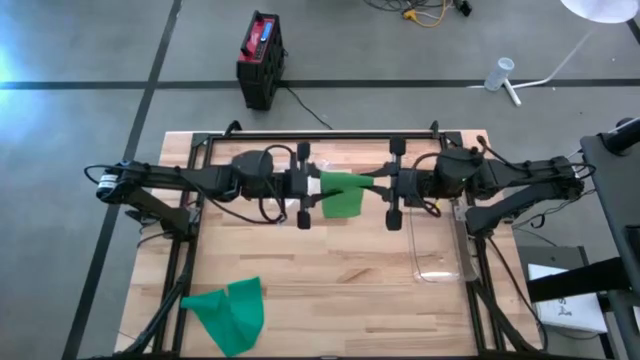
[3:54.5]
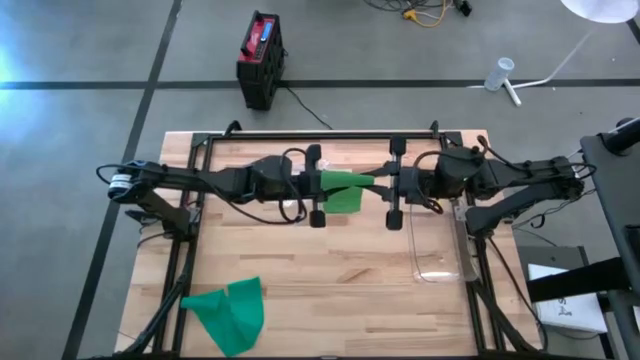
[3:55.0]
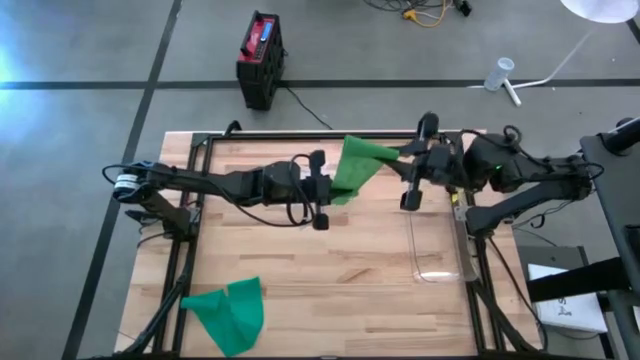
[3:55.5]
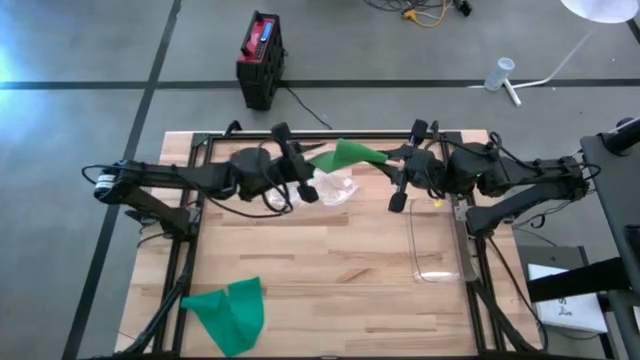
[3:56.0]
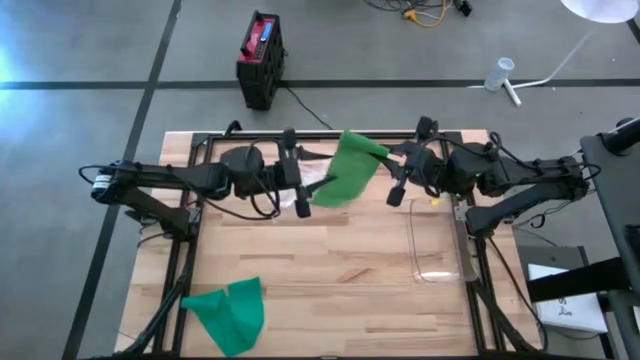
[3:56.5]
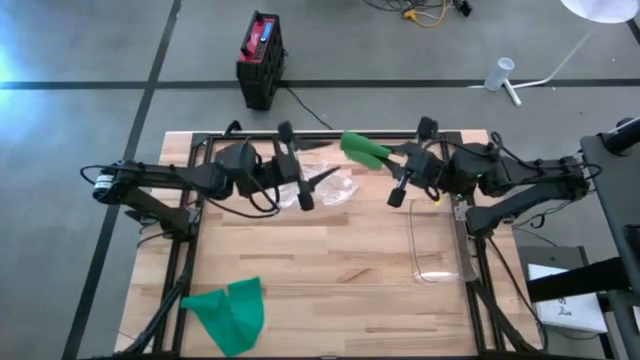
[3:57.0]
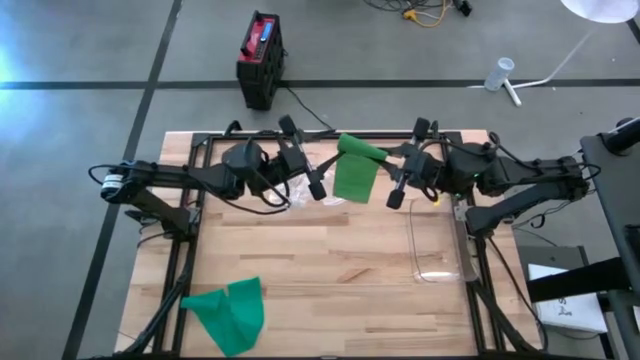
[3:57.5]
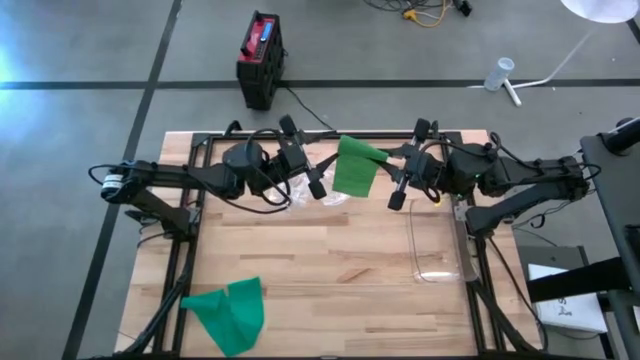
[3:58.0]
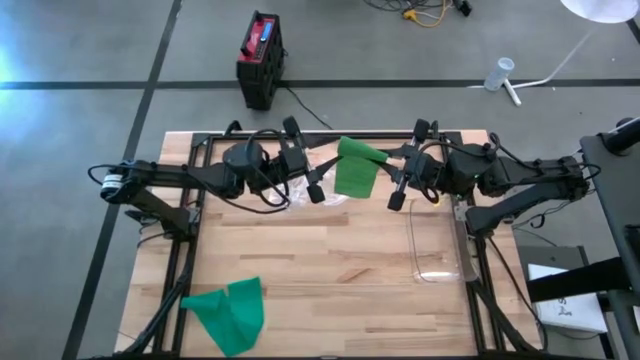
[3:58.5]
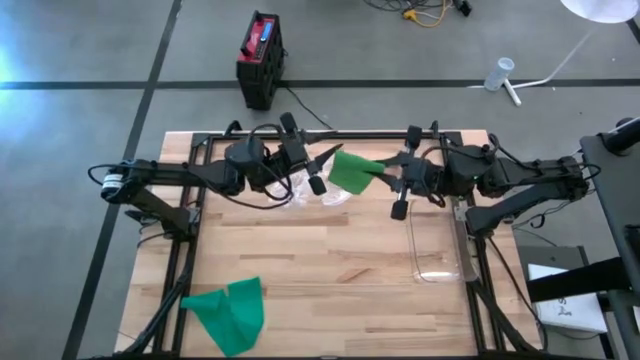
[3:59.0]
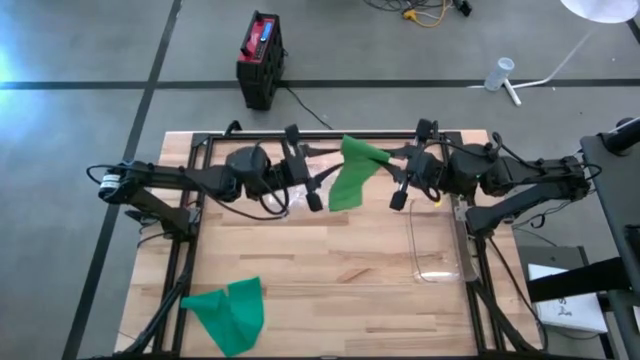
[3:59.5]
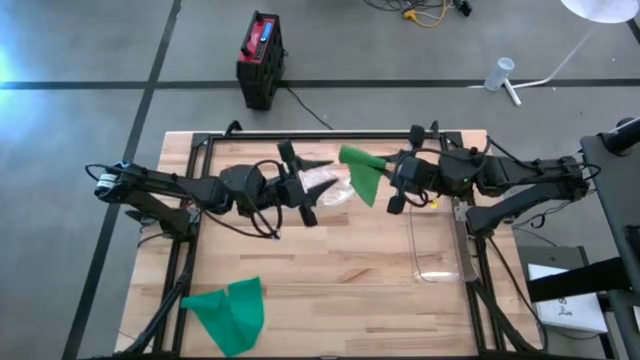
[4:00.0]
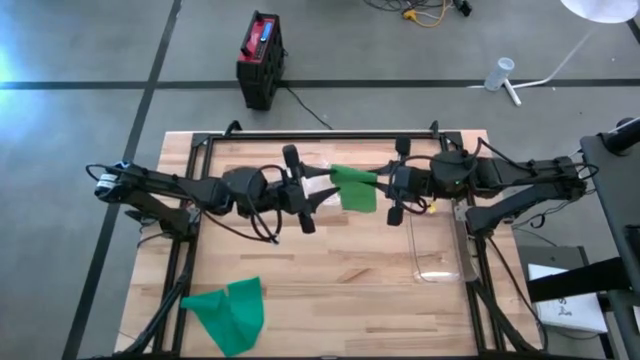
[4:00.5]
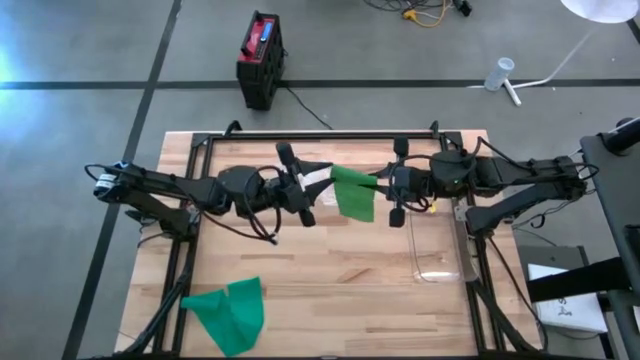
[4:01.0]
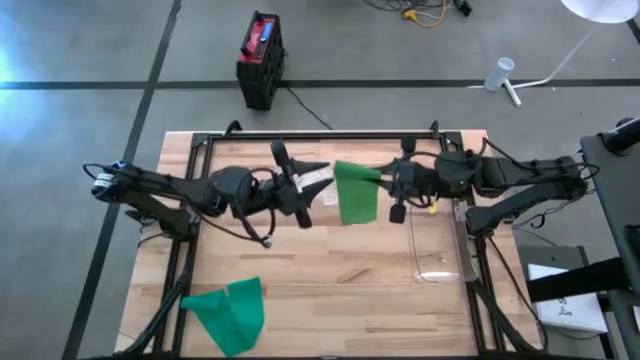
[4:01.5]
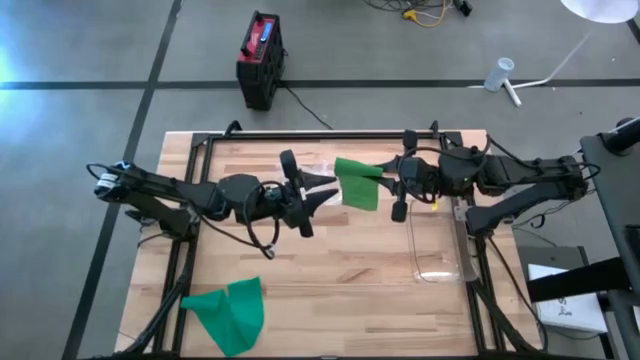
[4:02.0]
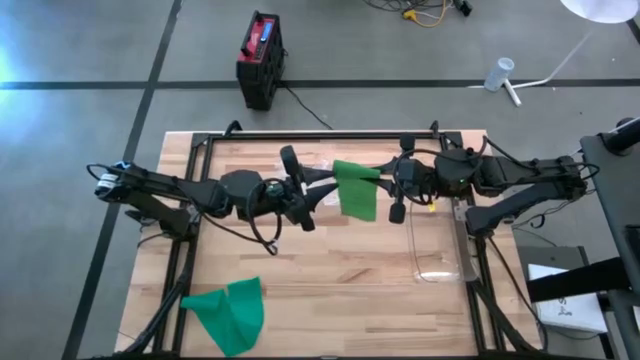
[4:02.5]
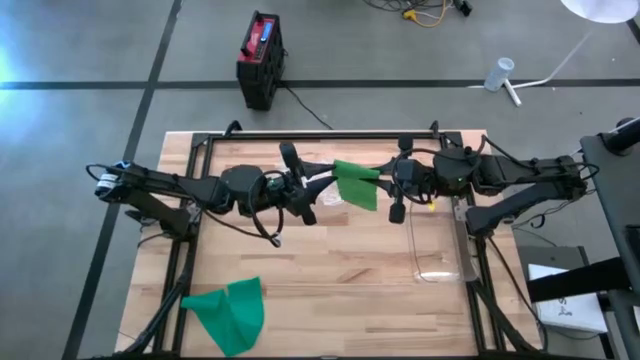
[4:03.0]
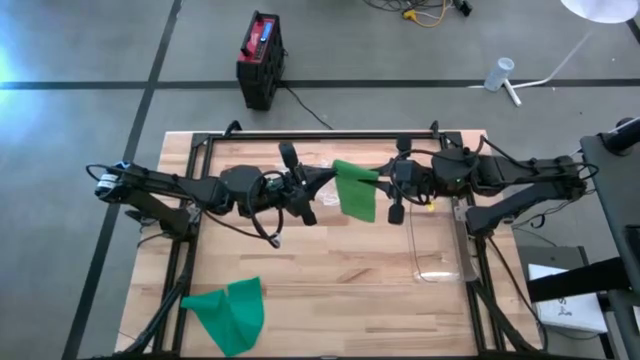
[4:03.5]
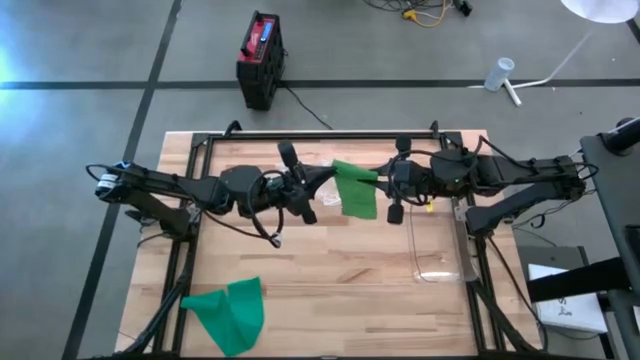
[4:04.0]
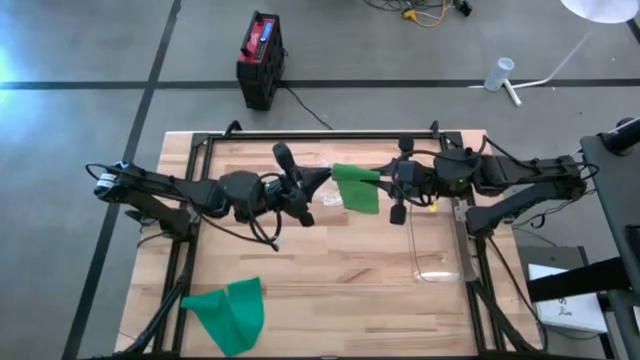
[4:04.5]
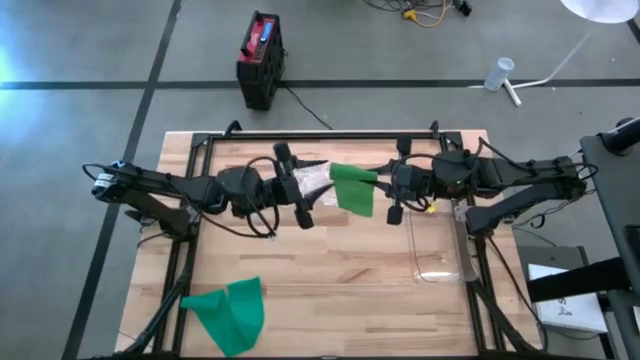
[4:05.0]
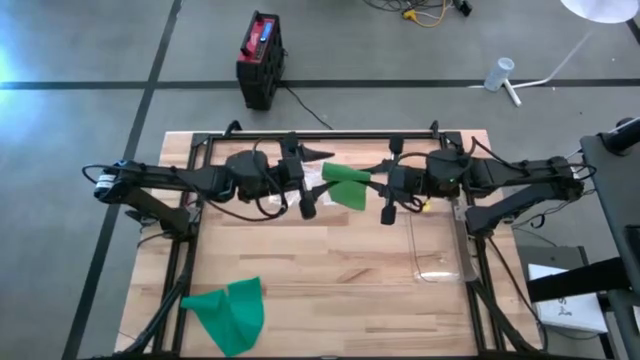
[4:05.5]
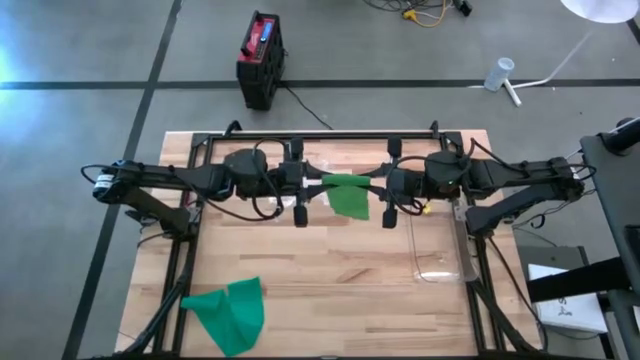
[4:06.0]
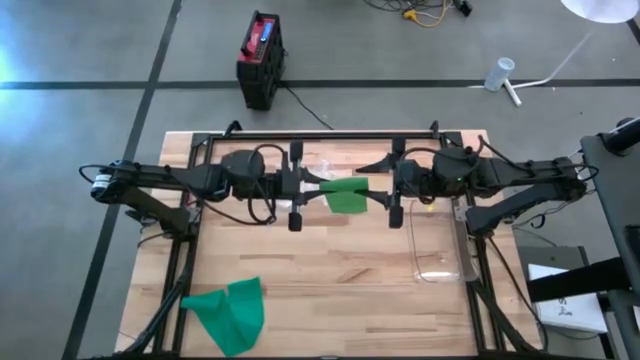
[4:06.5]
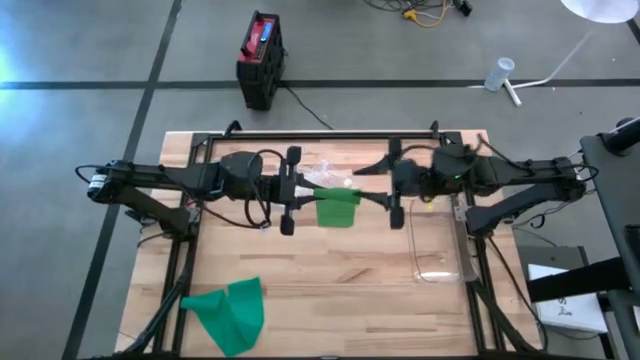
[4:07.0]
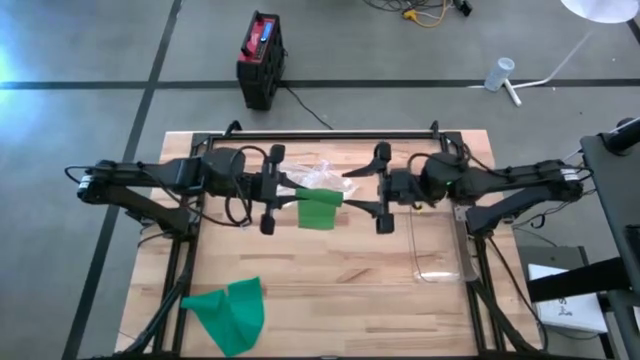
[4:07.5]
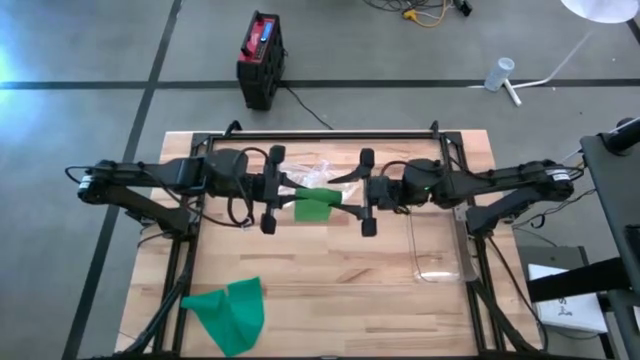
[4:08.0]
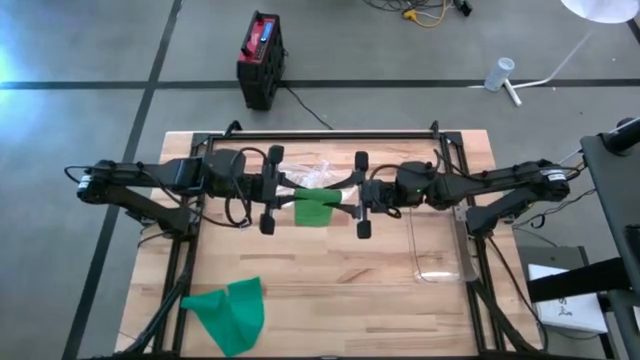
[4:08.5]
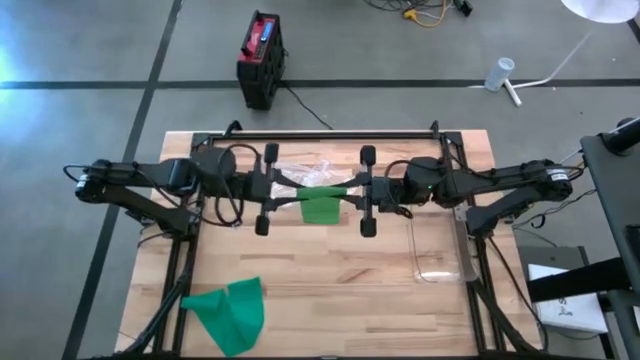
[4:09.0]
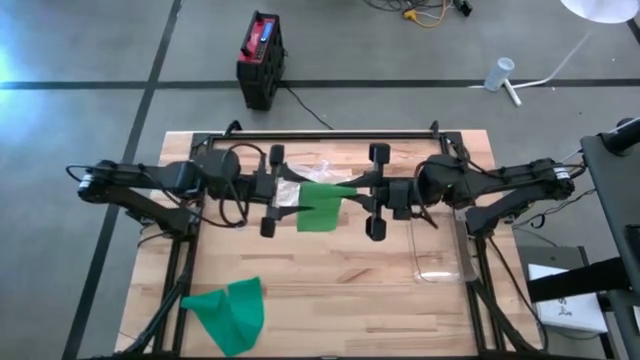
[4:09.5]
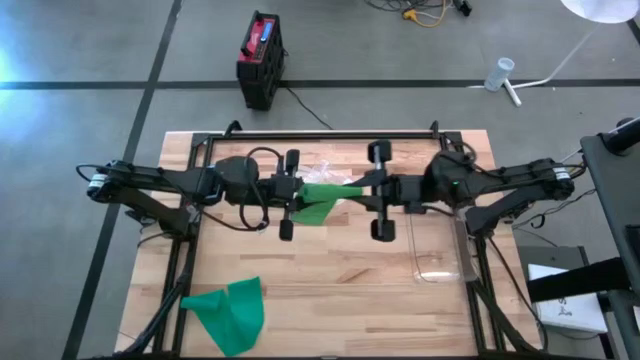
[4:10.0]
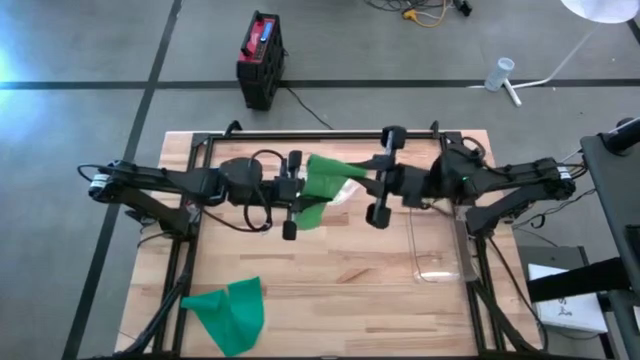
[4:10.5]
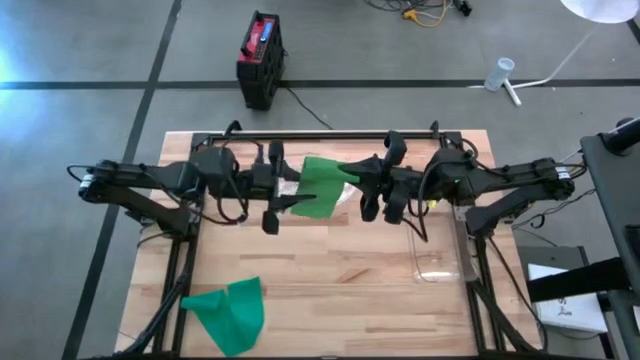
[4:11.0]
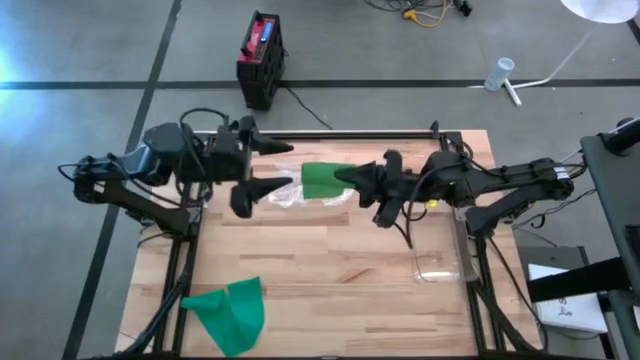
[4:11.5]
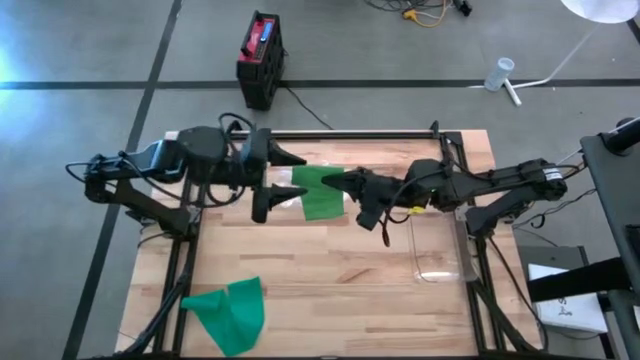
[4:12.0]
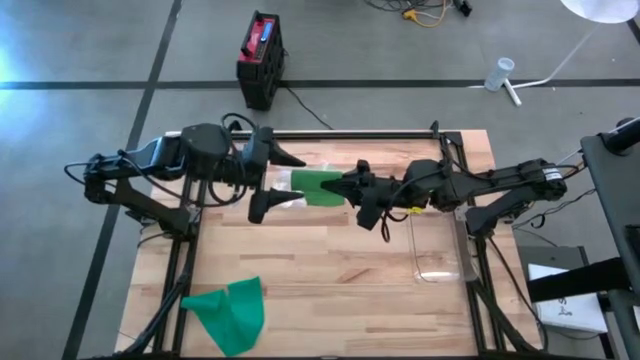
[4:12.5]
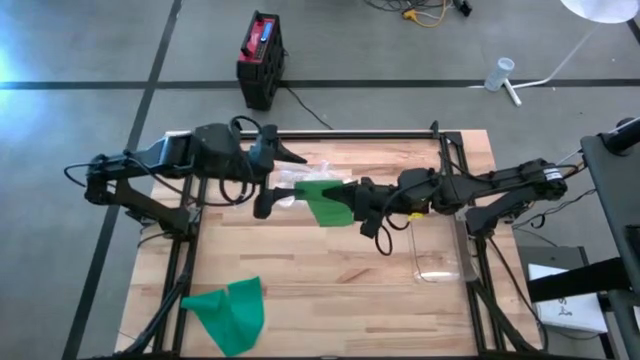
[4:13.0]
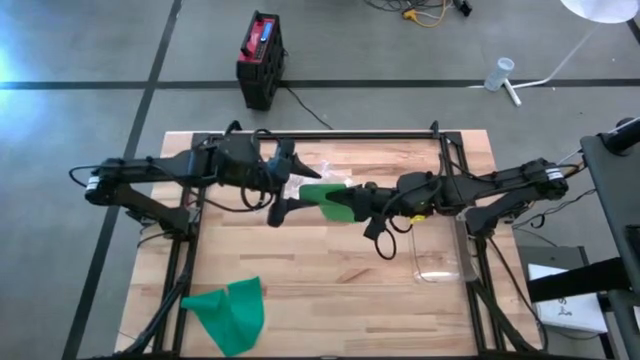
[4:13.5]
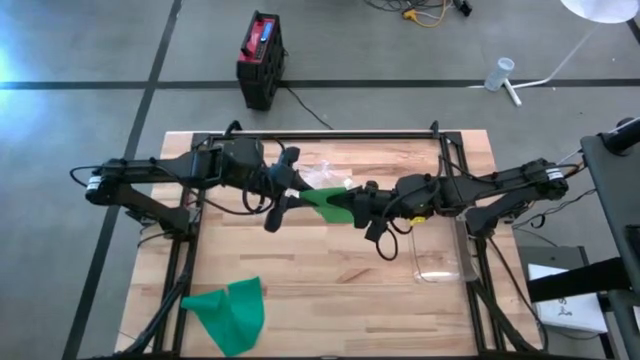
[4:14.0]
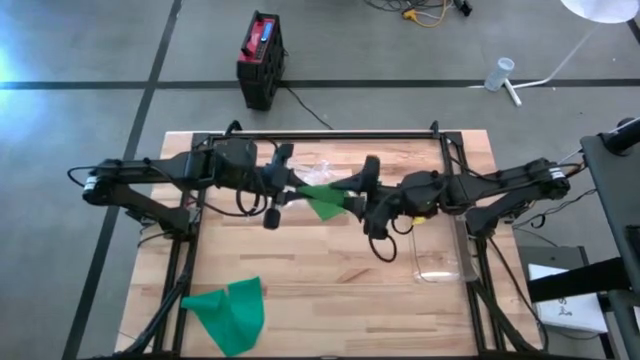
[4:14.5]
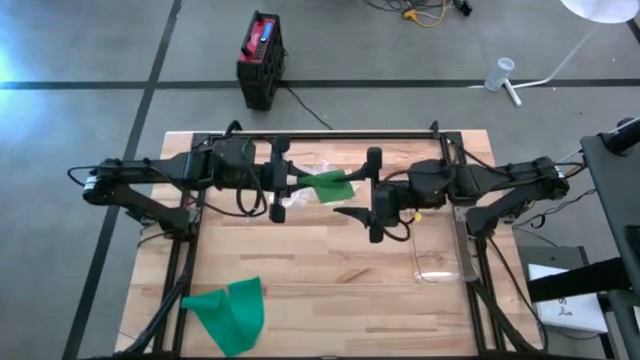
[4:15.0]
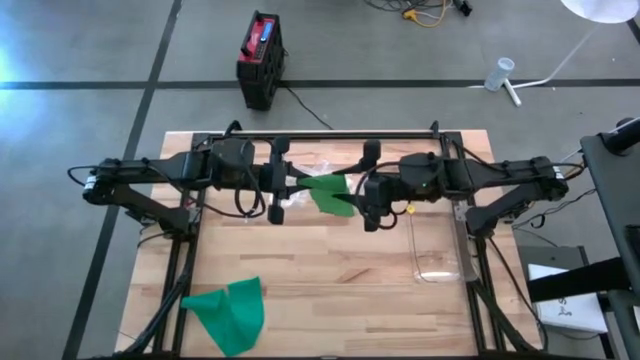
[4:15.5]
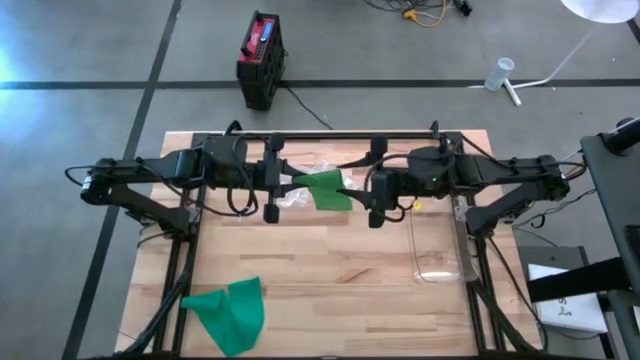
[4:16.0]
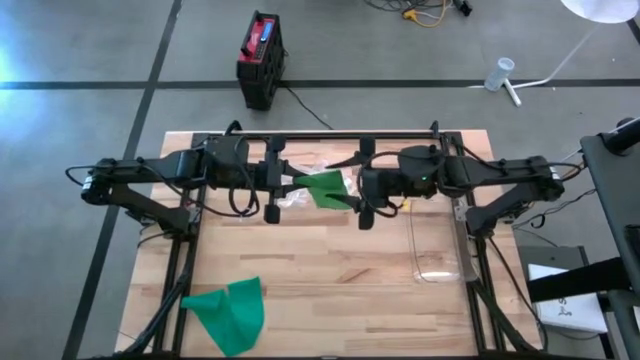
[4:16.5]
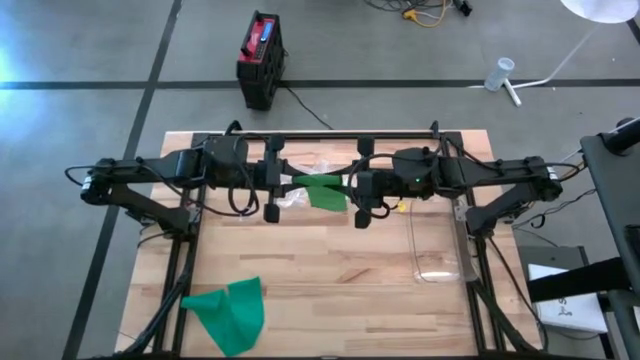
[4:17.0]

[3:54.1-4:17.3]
Task: Roll bandage
Roll the green bandage
